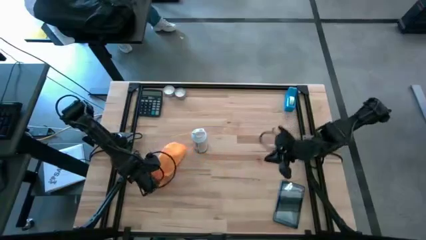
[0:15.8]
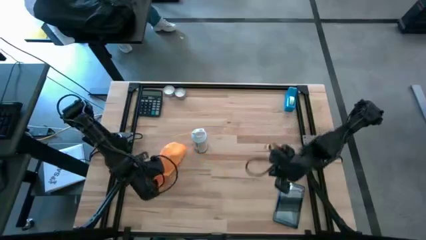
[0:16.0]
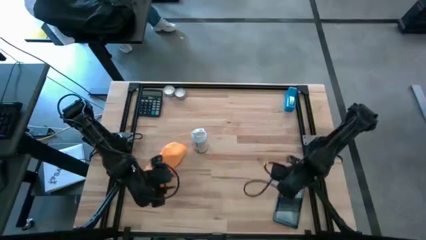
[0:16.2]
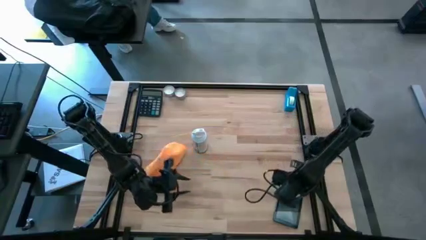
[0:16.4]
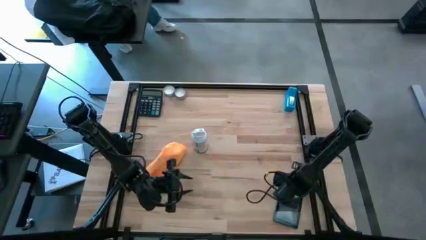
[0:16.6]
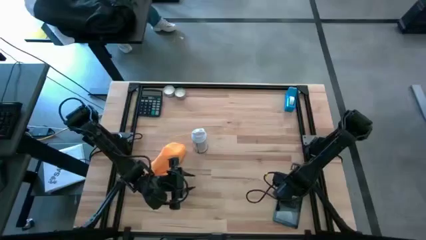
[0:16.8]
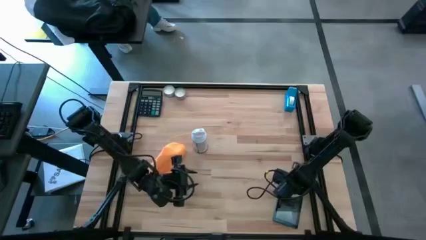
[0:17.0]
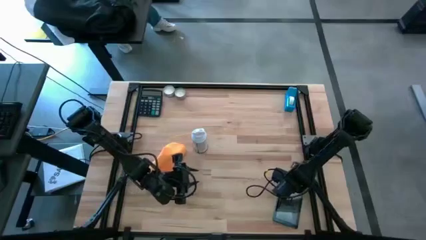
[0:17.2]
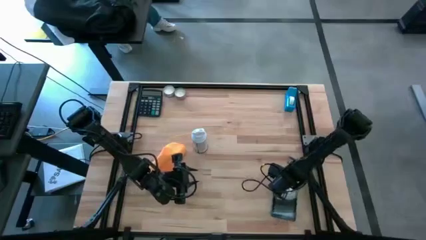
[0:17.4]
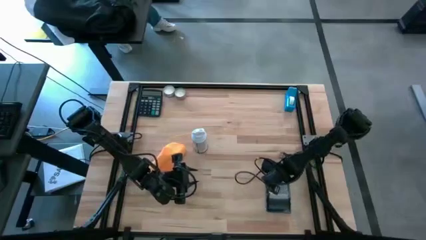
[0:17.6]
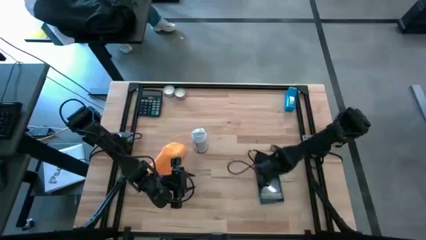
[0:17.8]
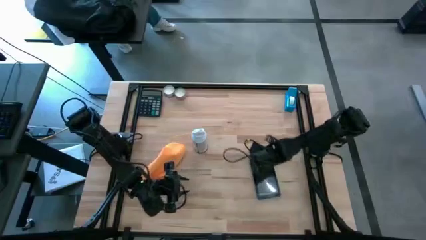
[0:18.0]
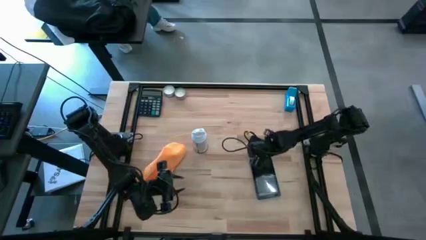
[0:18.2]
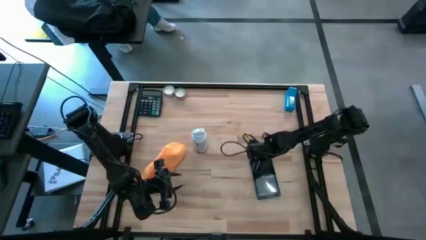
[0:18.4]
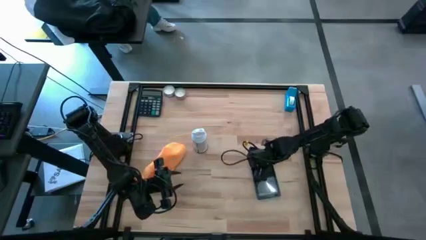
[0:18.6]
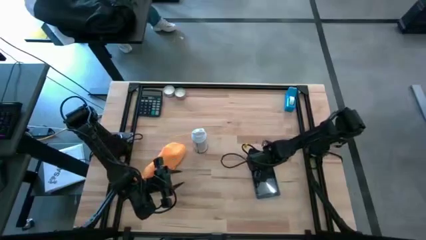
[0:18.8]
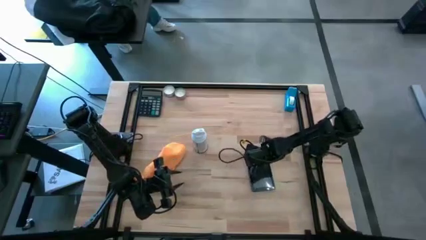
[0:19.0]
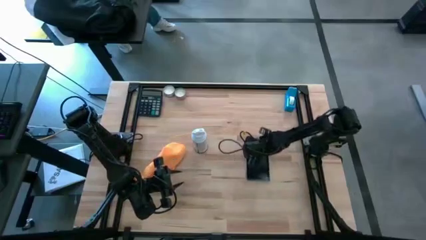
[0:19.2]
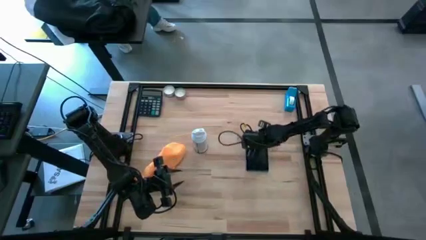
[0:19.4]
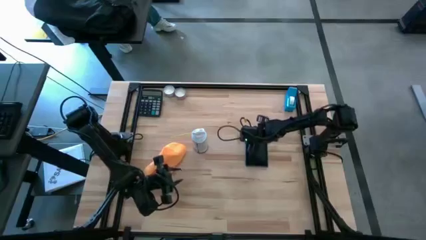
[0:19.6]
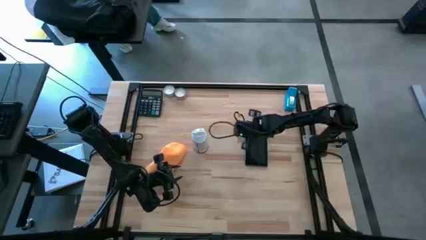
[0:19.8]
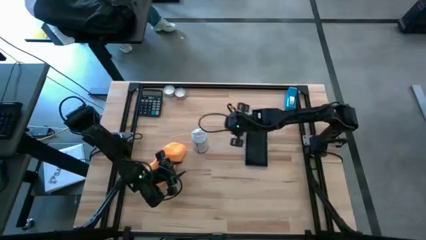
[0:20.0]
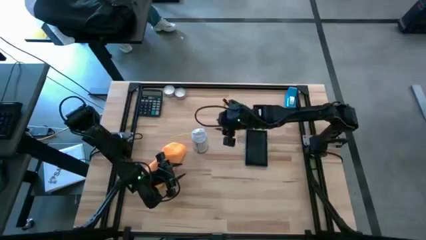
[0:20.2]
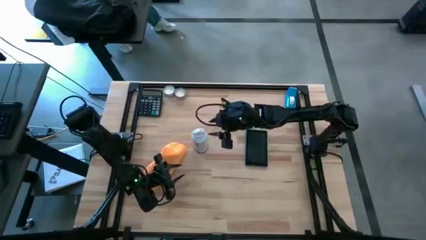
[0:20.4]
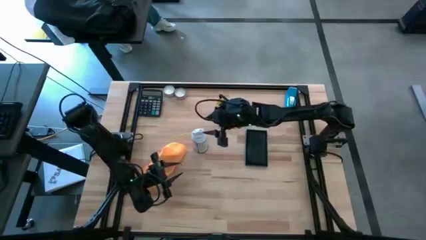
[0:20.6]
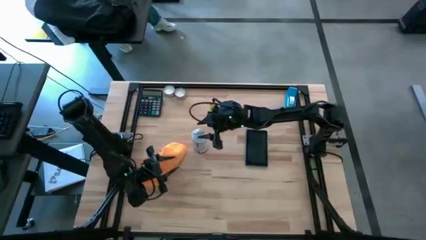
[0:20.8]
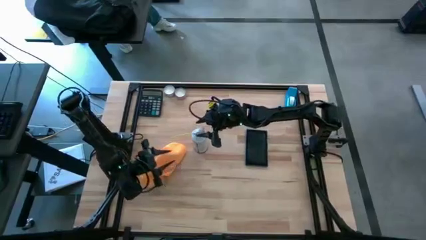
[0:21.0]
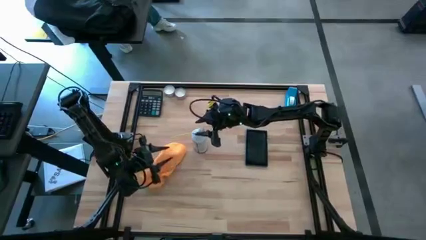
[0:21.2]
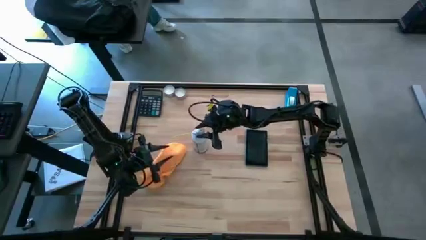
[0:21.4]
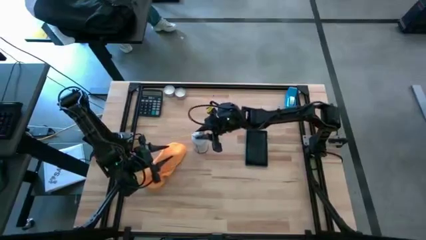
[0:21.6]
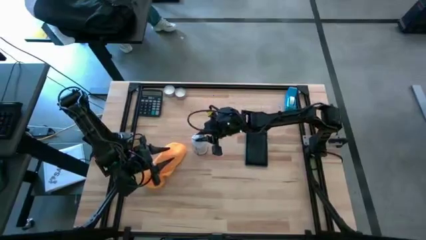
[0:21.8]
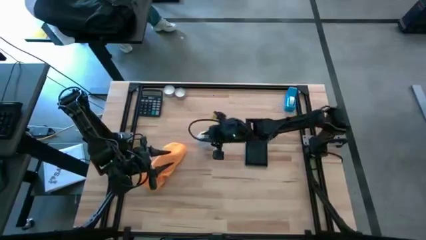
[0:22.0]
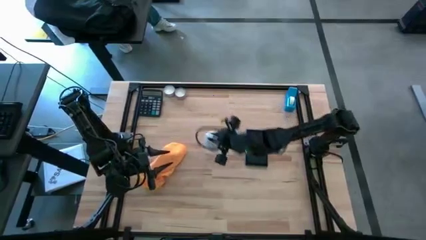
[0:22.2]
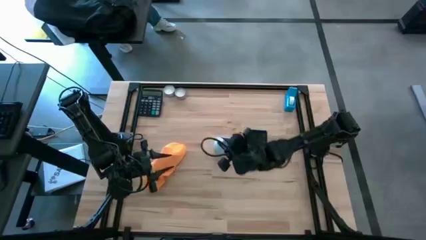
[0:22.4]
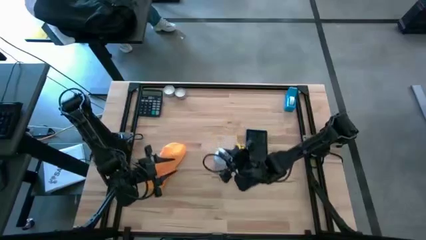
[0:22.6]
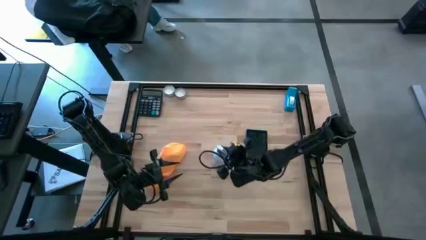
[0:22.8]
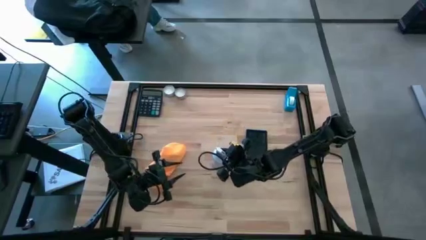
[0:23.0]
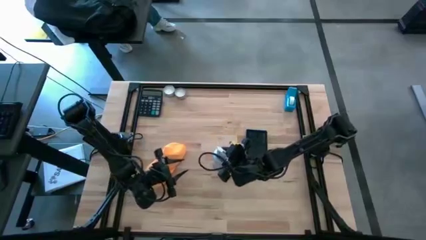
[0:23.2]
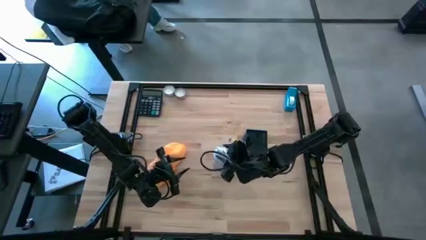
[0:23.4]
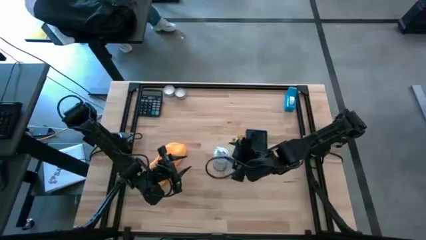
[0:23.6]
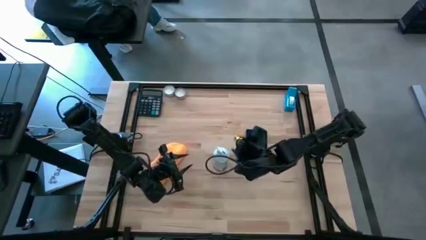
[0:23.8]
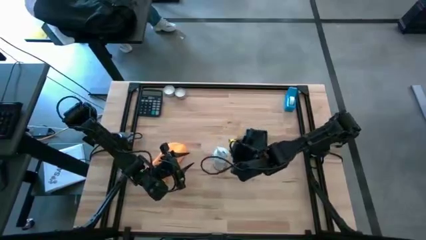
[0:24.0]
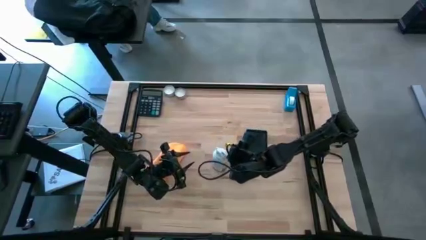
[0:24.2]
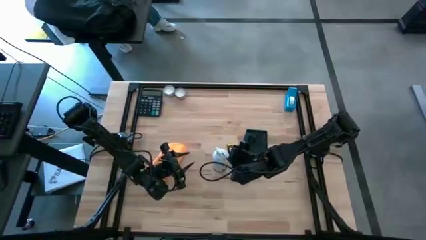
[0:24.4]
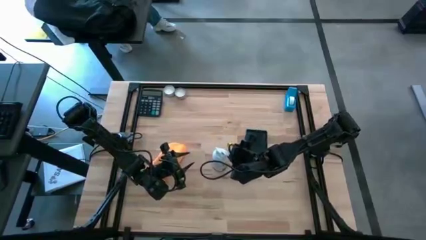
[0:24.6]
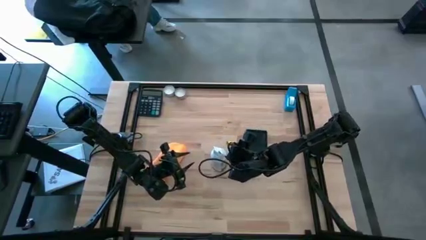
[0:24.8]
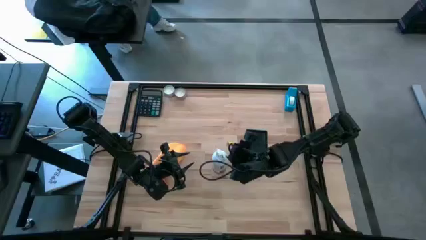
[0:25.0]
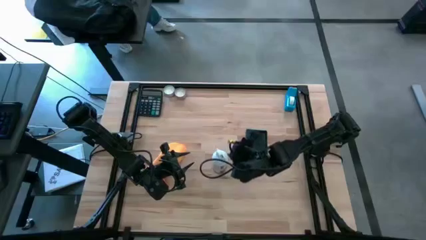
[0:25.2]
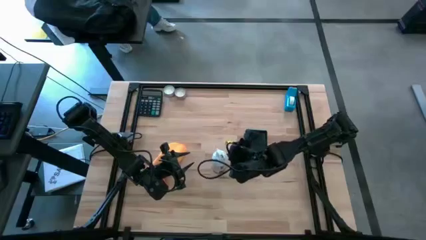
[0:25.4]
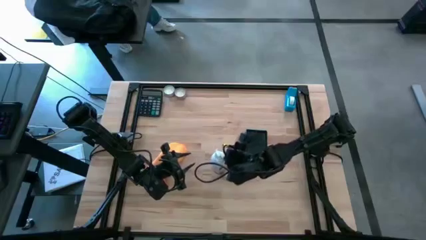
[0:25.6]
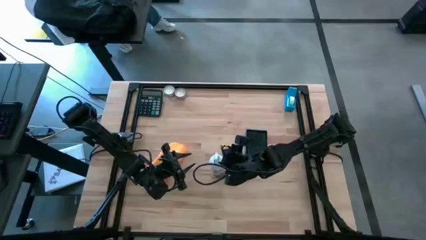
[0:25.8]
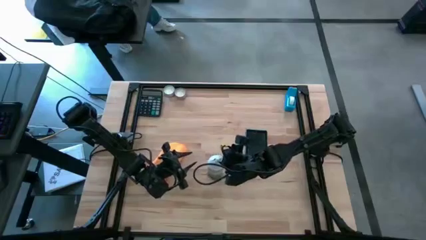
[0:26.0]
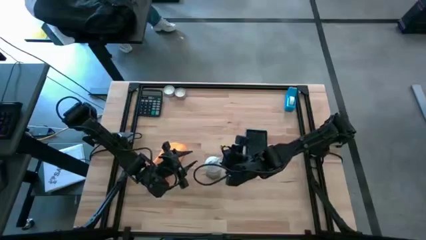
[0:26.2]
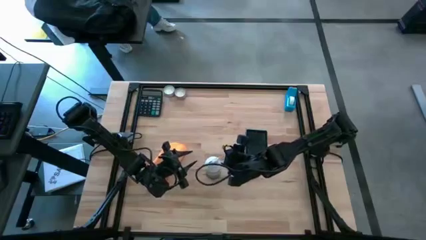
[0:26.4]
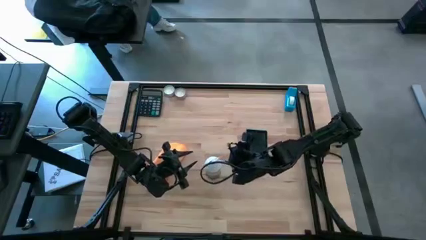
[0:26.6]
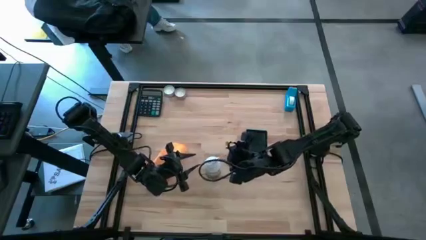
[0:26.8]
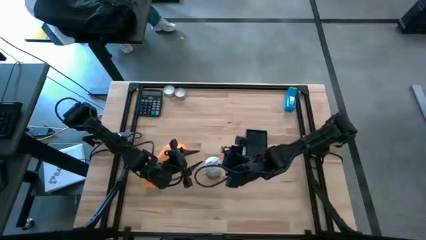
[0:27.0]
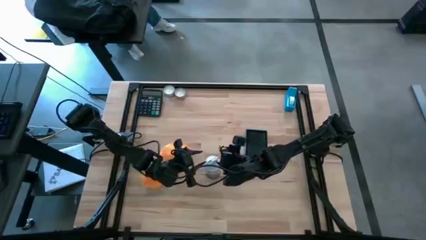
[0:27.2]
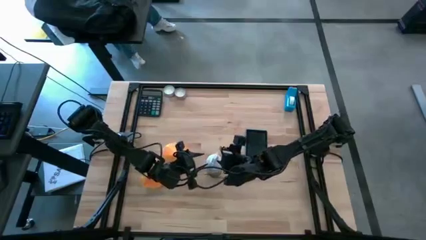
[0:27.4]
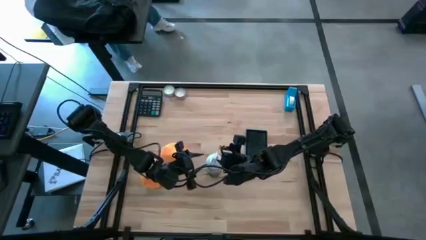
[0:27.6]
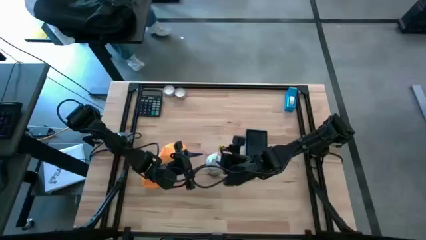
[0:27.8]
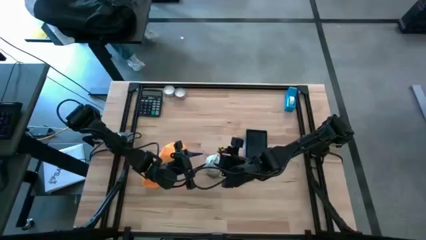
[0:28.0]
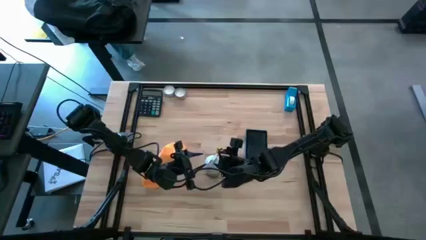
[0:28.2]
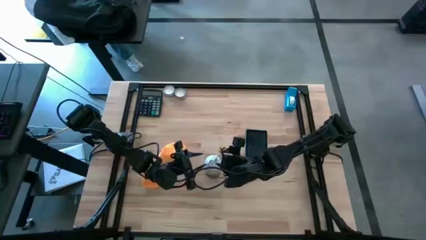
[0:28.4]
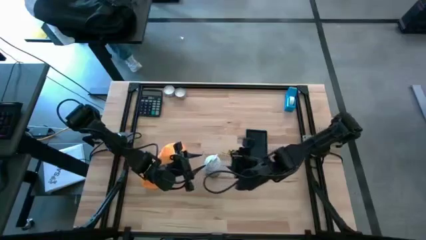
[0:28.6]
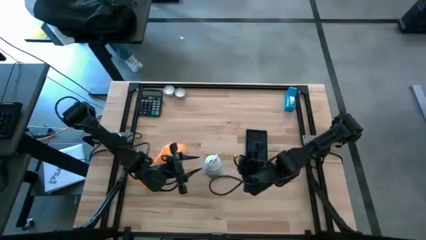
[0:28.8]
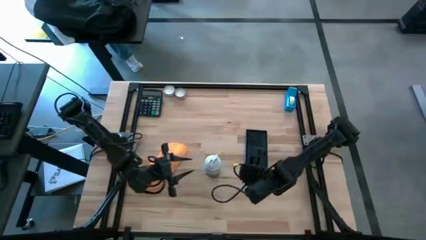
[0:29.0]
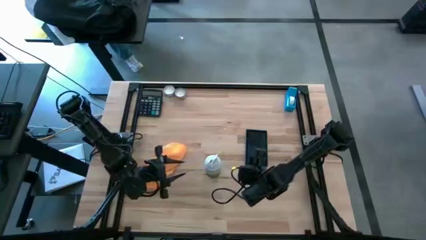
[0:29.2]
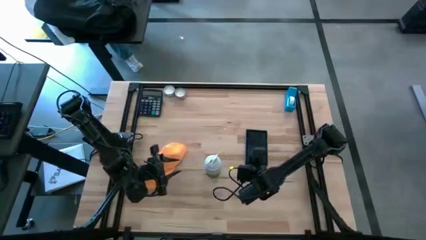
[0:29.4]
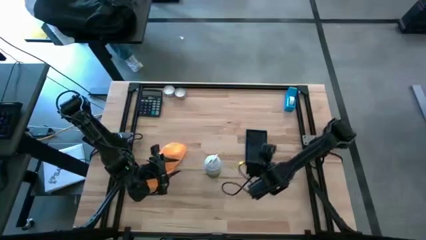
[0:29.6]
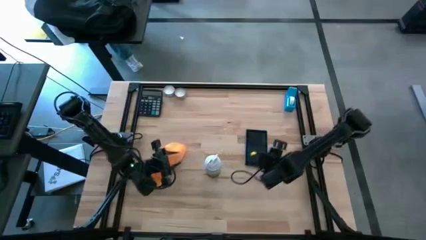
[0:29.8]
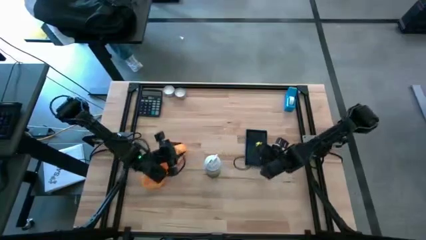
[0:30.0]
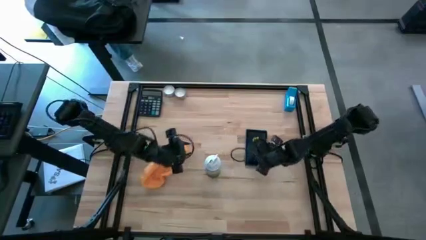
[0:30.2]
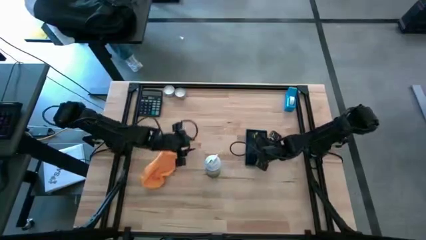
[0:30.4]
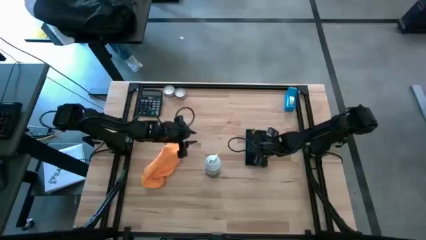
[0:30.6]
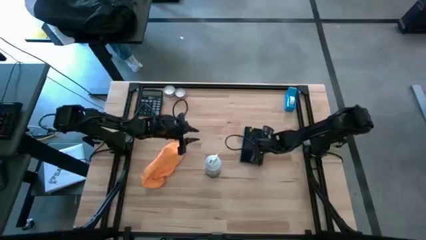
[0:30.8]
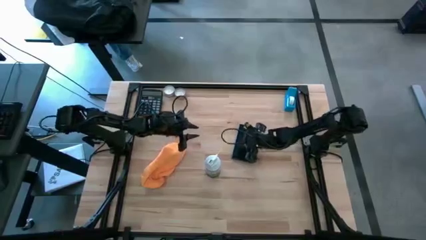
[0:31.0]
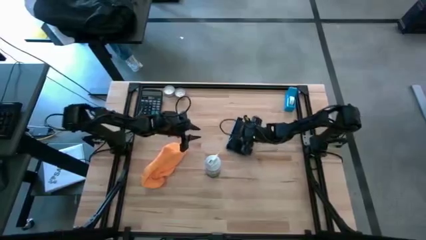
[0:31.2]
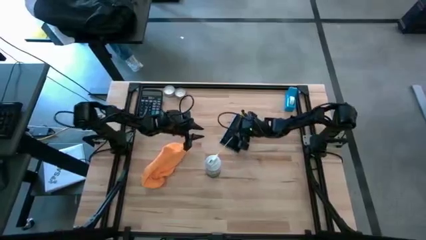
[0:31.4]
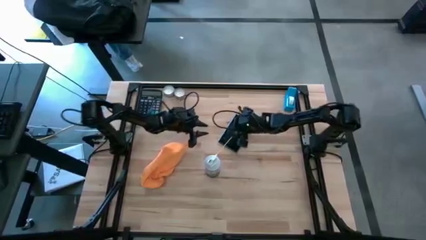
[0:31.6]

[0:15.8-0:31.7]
Task: Apply microfiber cloth
Spray the back of the blue tablet using the white spray bottle
